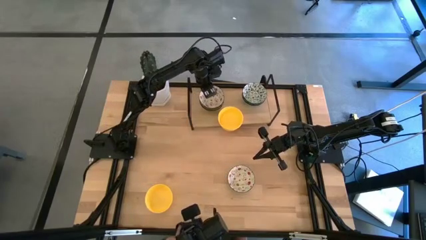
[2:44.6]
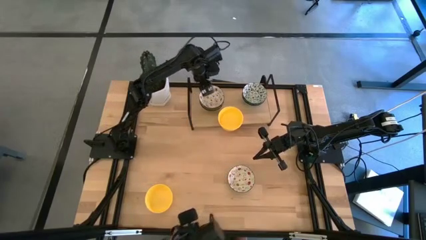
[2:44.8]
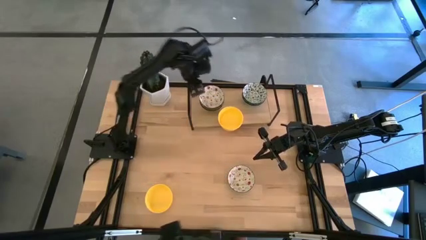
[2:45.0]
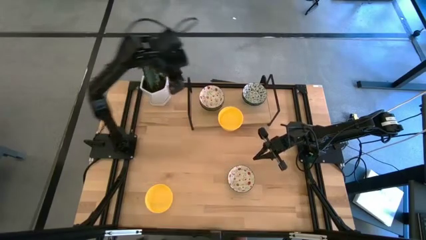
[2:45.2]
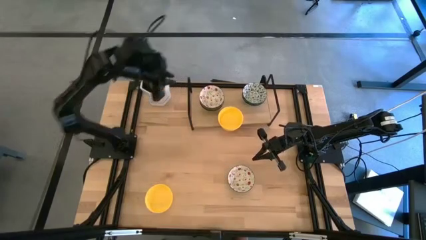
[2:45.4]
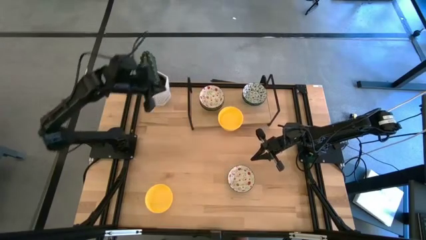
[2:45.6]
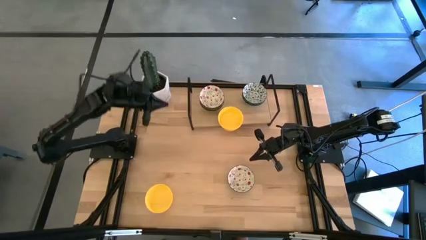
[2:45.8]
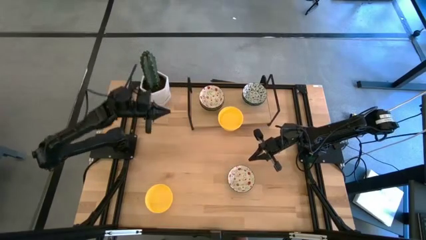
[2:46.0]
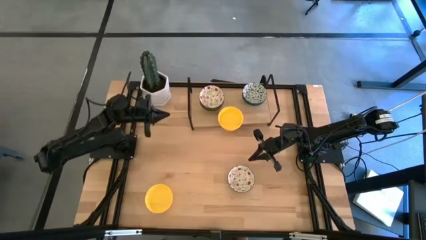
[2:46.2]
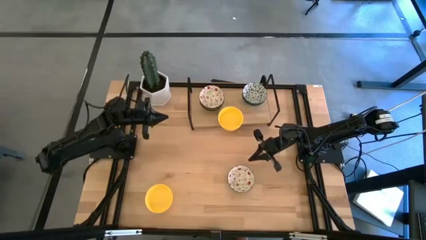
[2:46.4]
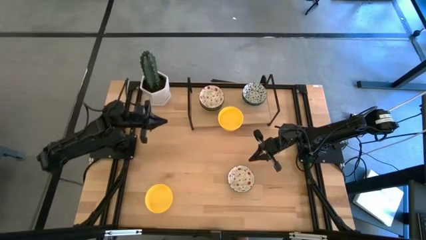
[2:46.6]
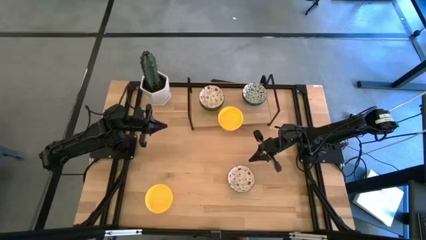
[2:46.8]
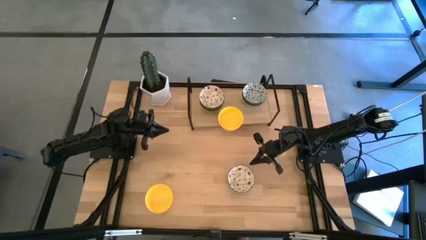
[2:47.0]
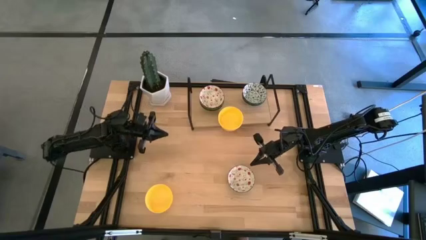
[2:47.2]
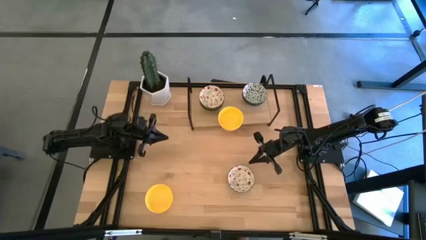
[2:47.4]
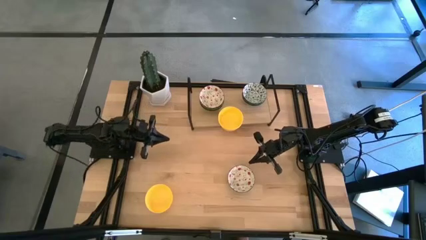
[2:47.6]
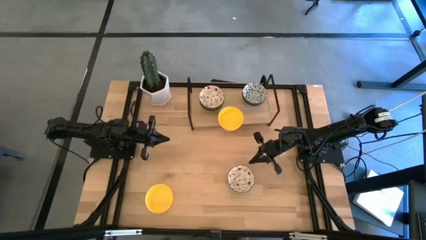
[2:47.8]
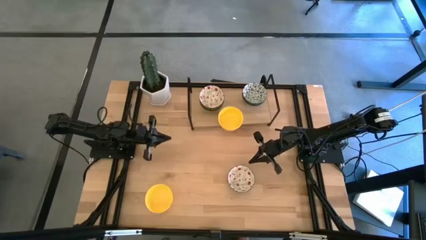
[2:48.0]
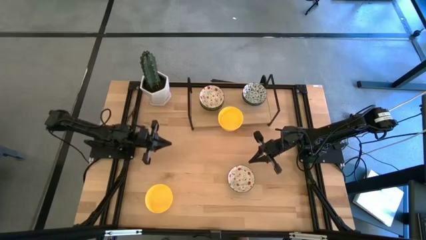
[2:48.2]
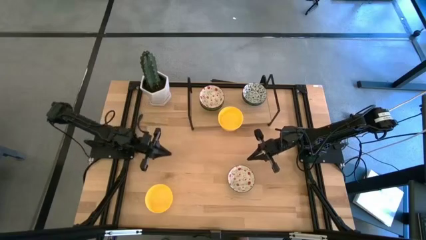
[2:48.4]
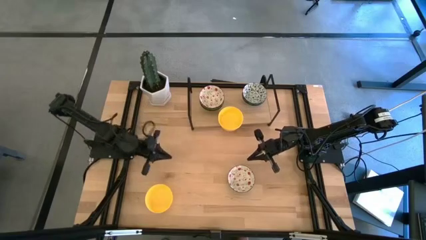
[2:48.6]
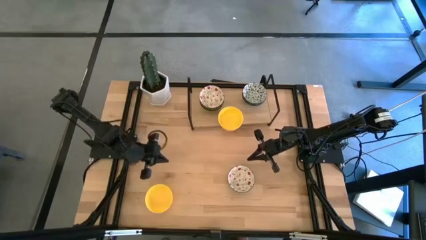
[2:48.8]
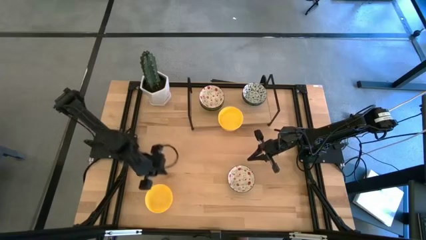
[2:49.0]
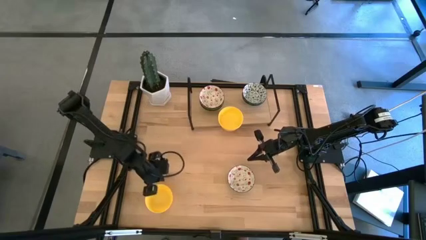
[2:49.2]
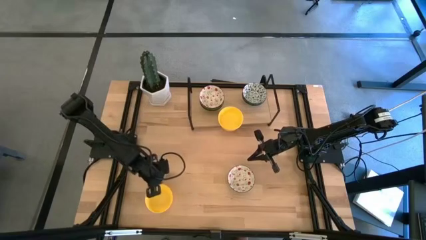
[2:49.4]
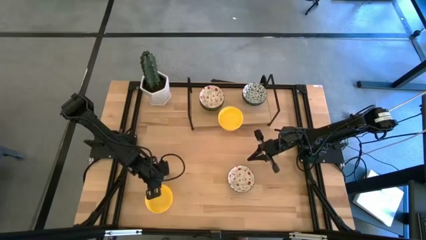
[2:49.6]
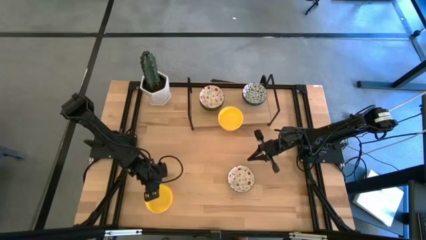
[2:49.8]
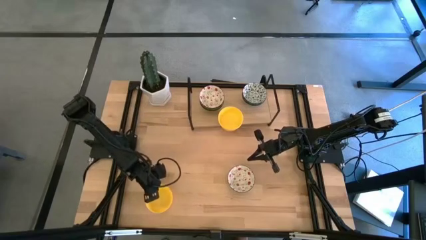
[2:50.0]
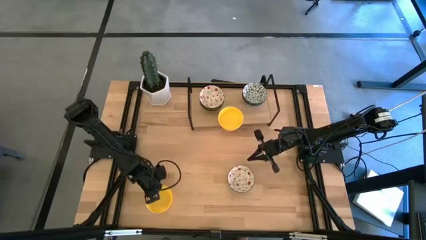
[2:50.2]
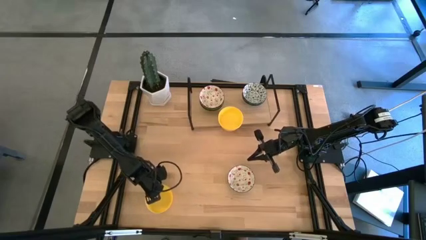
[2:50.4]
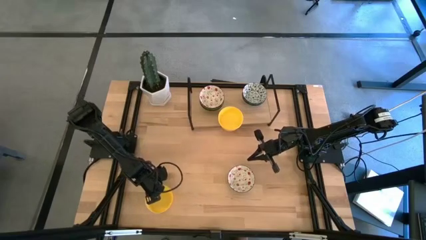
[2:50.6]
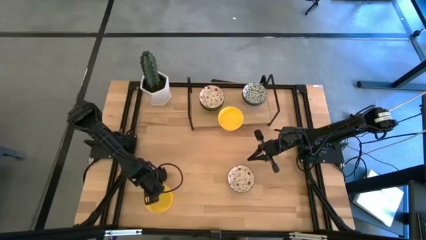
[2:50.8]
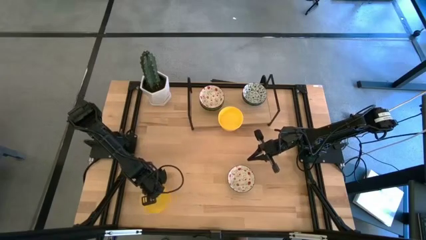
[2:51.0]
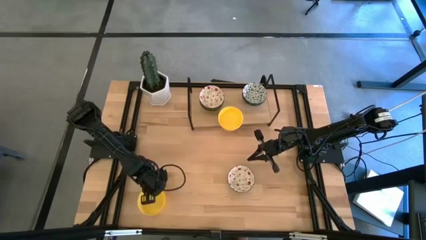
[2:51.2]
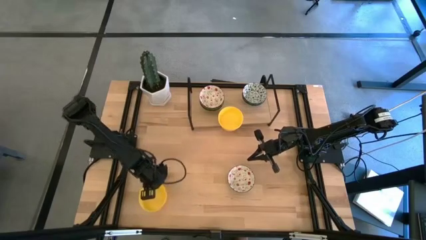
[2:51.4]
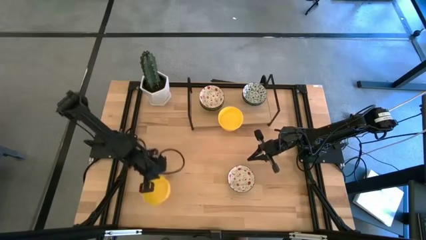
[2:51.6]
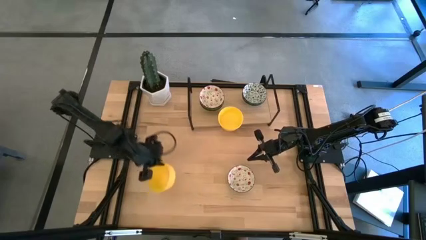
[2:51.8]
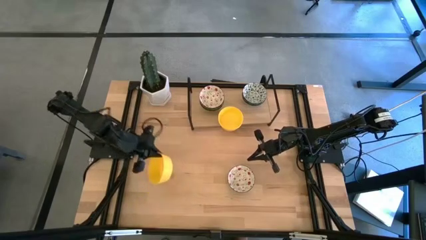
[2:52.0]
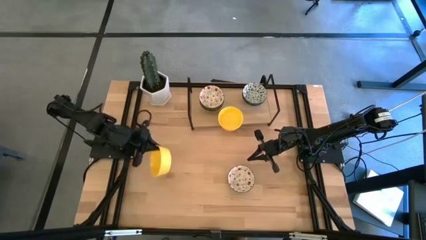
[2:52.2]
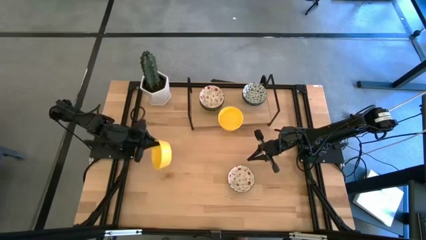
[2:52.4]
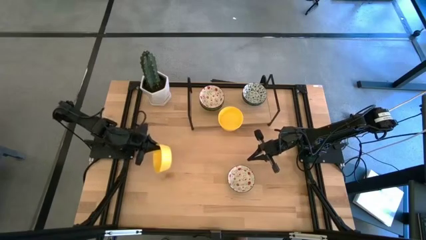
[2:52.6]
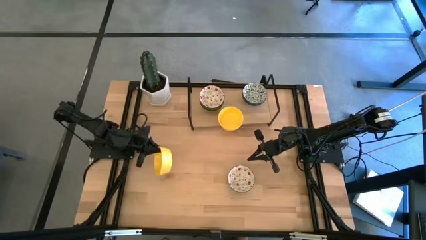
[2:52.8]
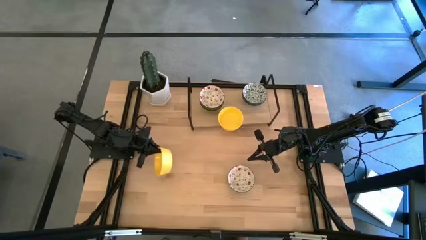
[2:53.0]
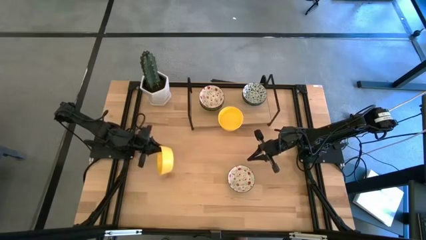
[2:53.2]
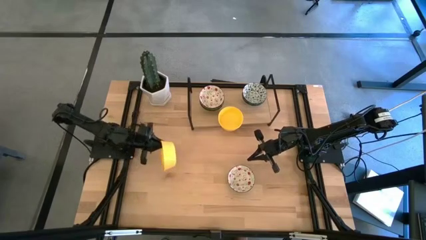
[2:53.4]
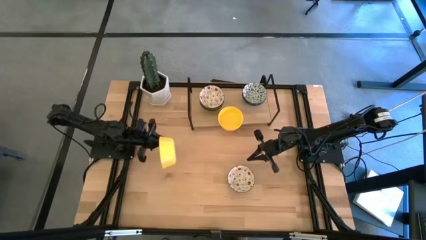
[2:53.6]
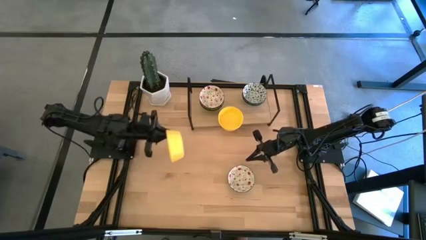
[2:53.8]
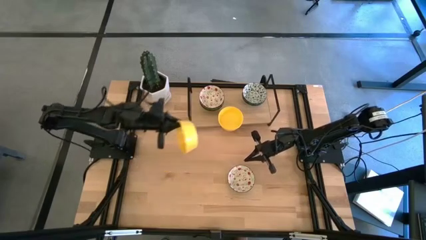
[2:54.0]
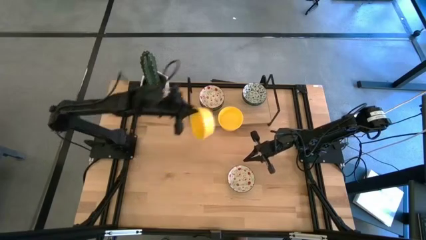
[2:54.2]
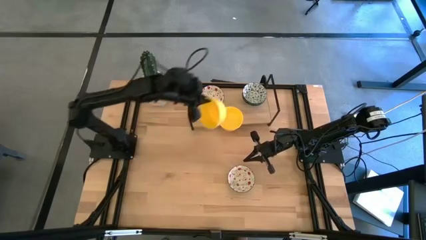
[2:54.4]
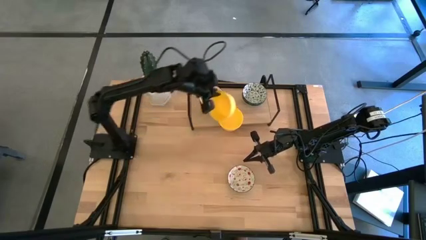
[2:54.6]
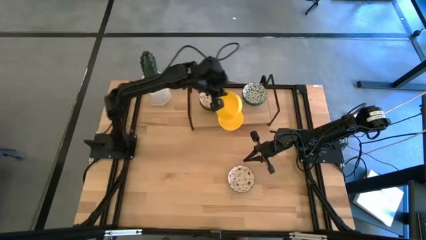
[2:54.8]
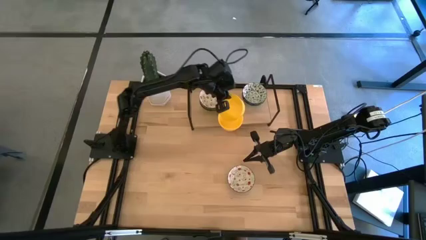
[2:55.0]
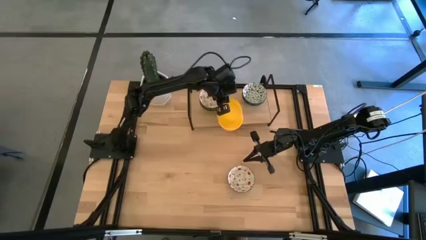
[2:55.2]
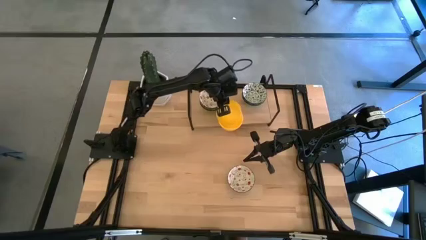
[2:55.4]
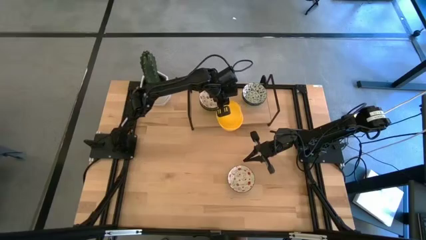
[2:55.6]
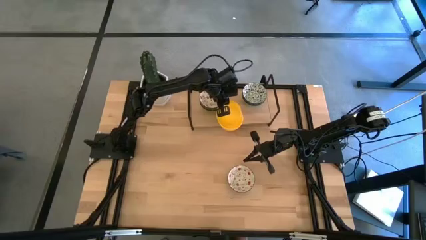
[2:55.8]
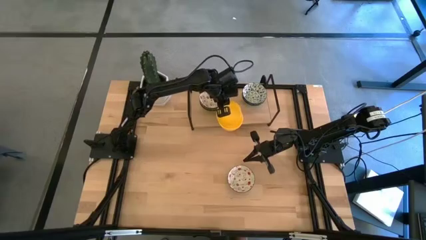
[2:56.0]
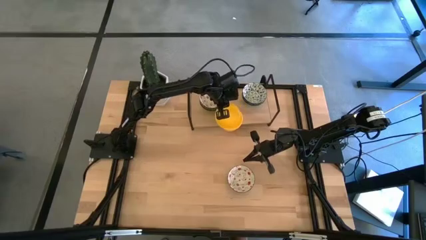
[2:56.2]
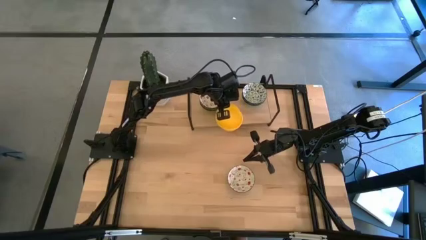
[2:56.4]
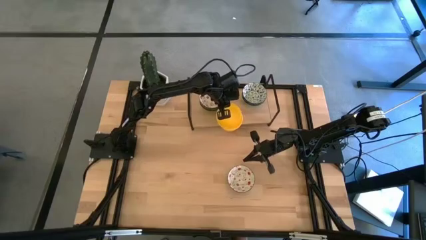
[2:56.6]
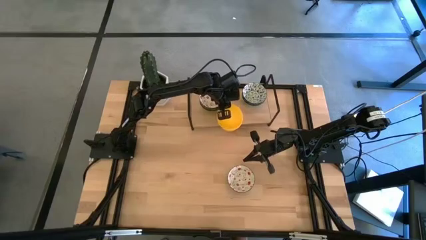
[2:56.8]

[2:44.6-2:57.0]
Task: Pick & Place Mini bowls
Stack the yellow bowl on top of the yellow bowl on the shelf

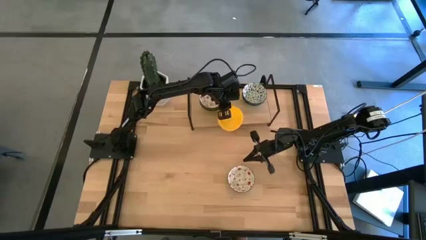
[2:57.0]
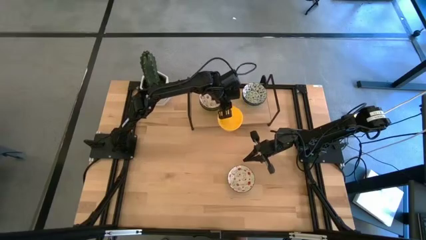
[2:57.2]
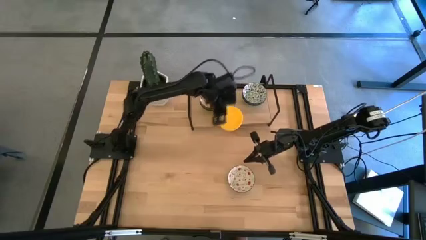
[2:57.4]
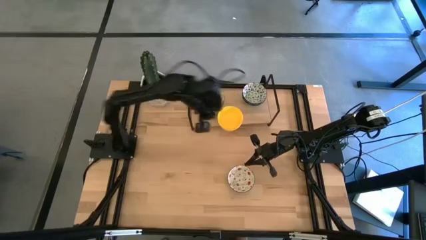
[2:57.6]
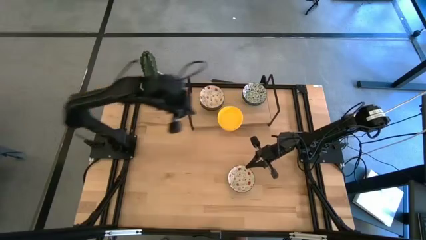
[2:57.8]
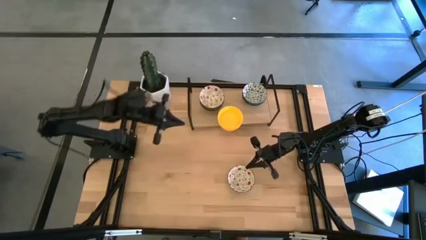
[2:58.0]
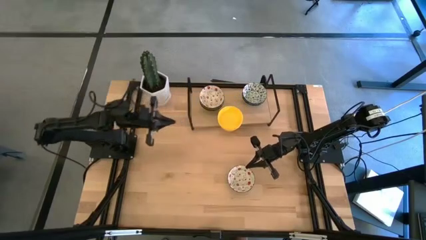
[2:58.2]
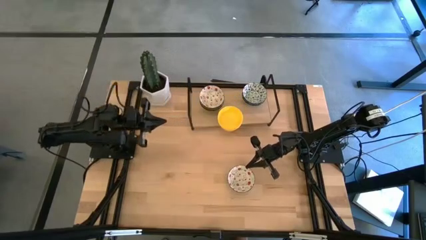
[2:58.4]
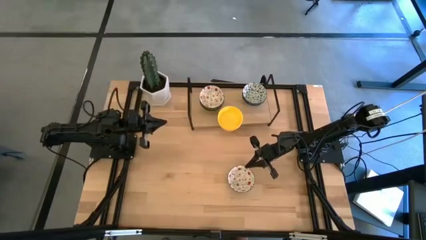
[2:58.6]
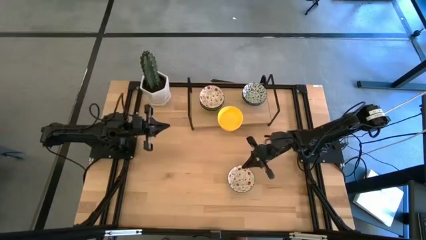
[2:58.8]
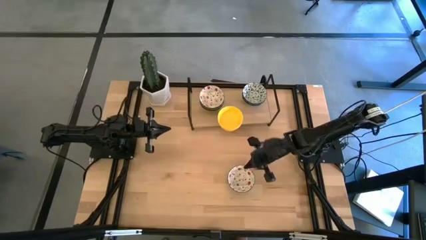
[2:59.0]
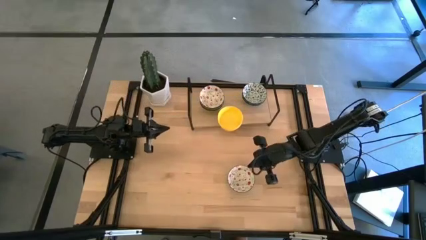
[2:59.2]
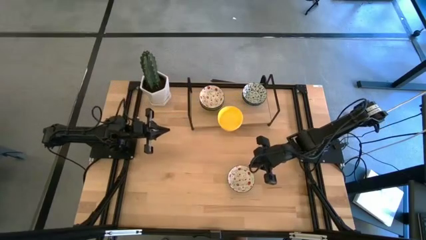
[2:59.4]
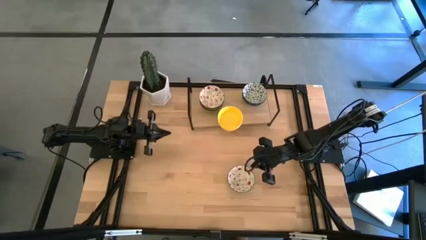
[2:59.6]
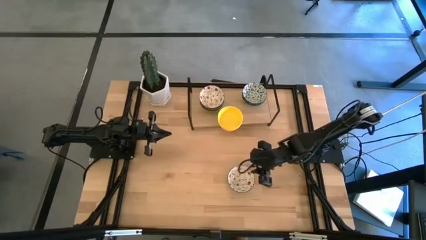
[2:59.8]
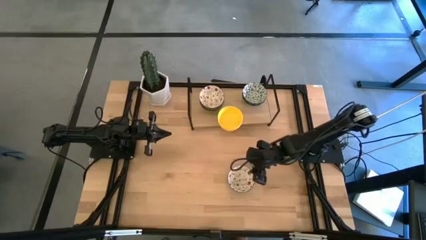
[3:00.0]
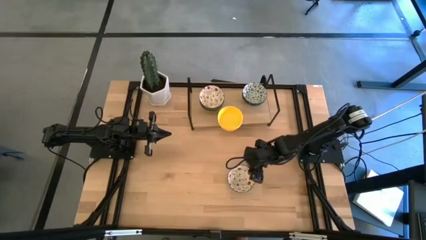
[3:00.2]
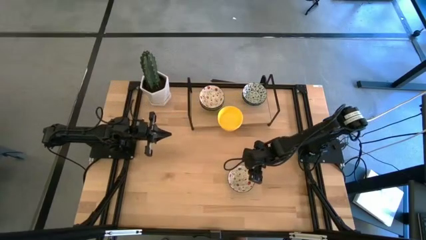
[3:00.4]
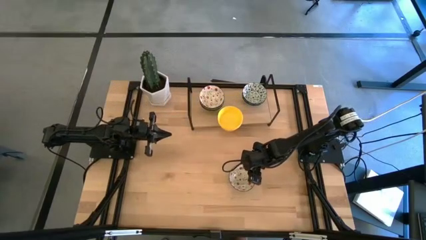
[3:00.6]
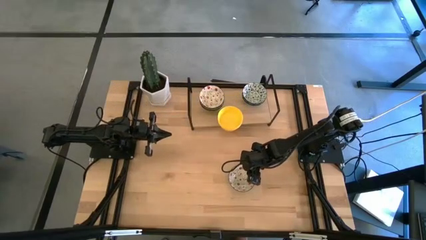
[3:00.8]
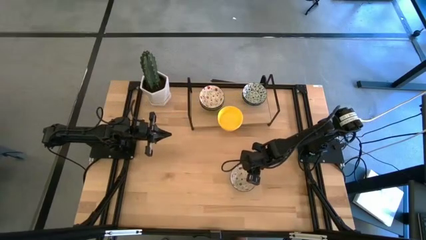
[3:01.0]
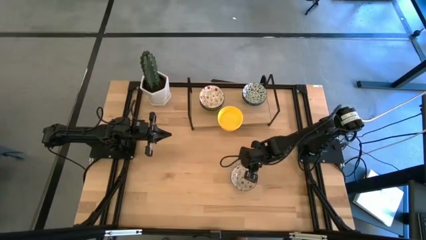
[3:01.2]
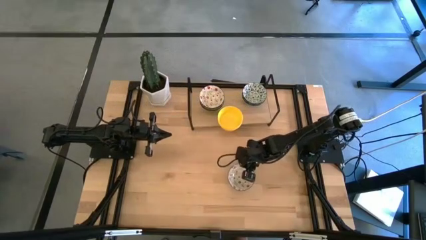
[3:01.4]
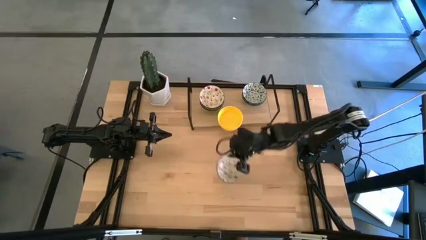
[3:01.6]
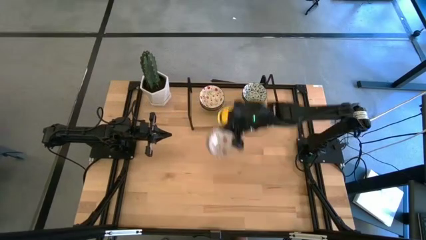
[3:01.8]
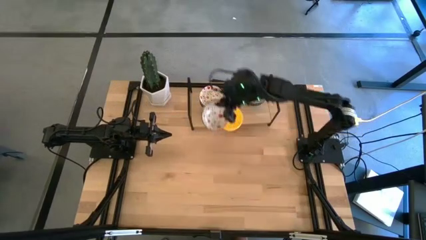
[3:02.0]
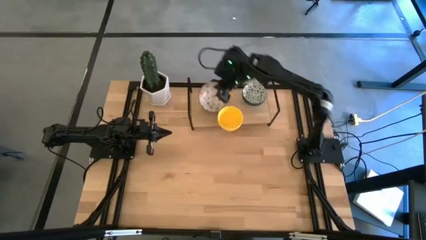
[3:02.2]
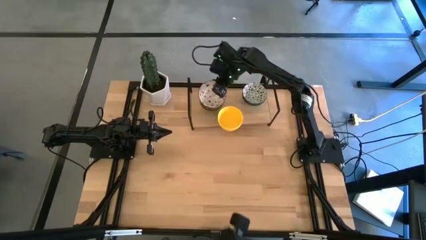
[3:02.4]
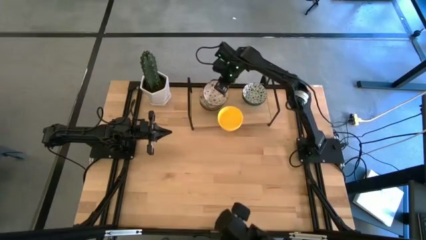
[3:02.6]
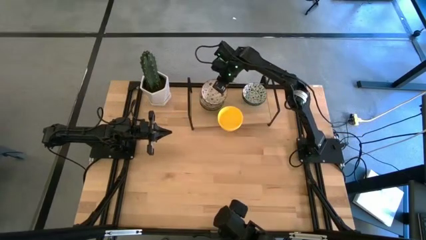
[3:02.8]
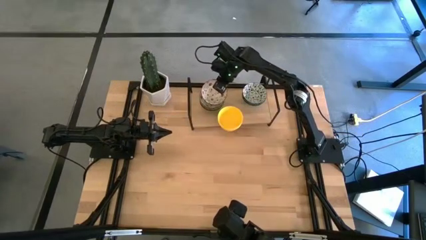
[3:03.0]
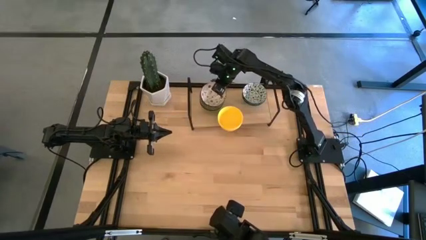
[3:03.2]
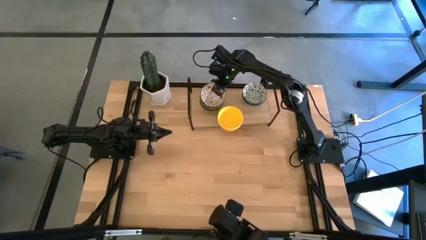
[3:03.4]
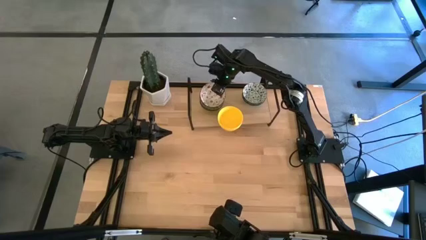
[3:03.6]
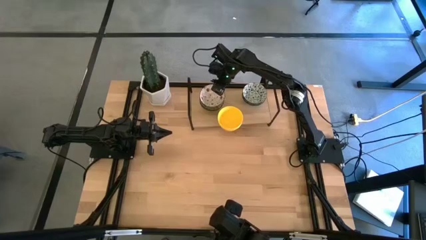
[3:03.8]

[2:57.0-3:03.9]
Stack the red patterned bowl on top of the red patterned bowl on the shelf
